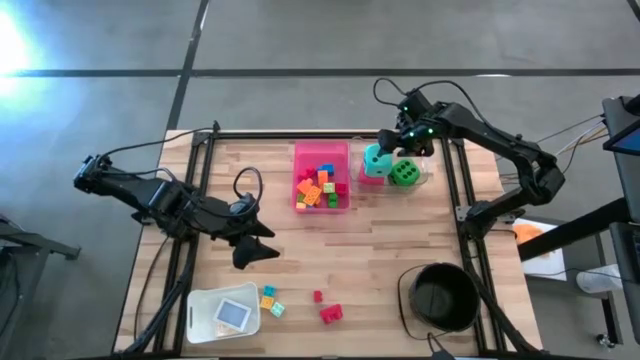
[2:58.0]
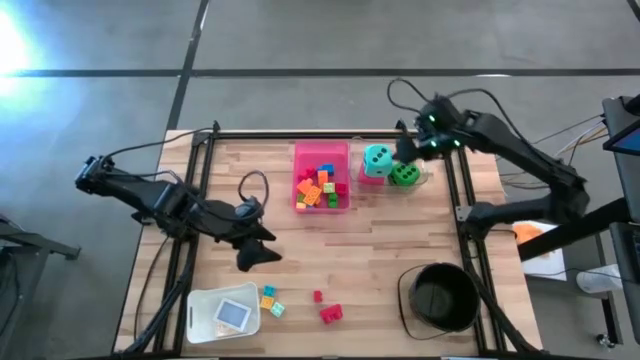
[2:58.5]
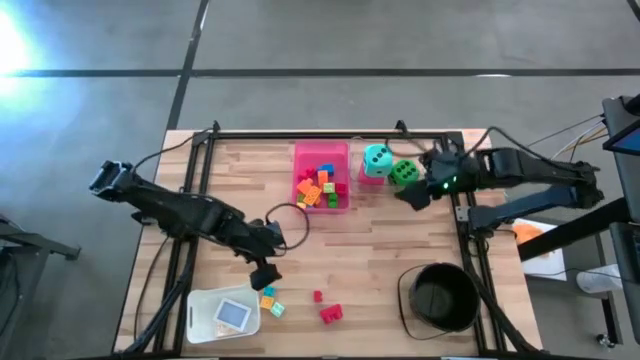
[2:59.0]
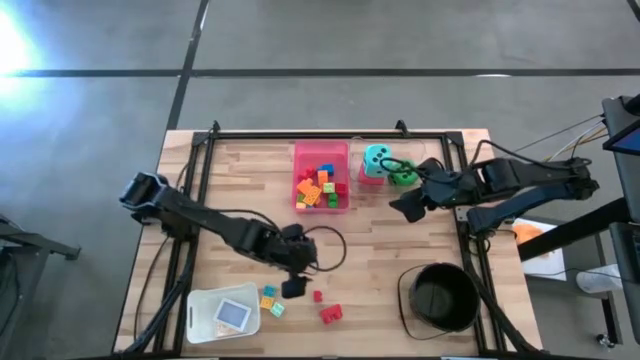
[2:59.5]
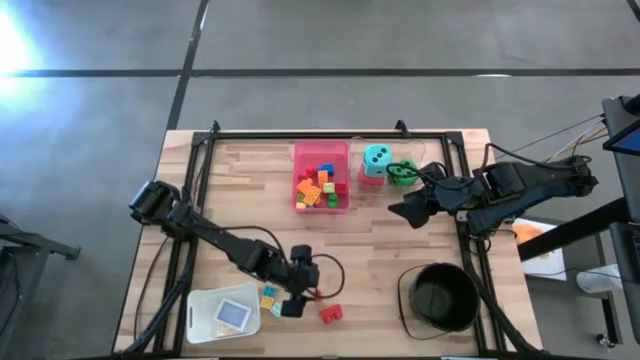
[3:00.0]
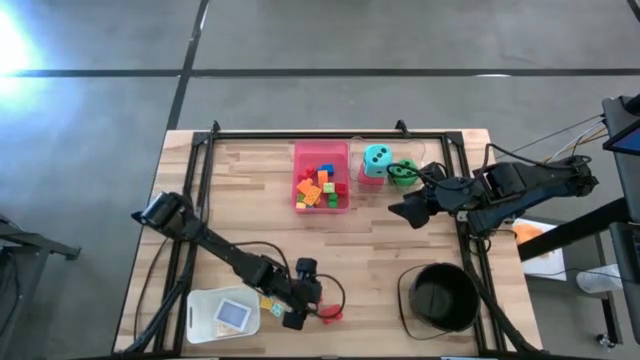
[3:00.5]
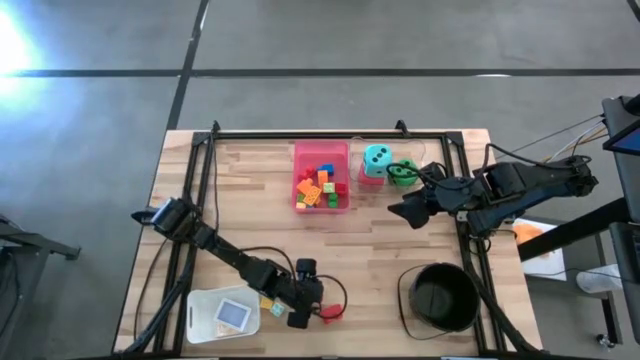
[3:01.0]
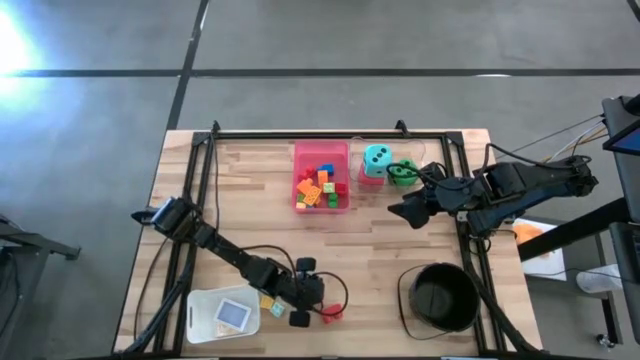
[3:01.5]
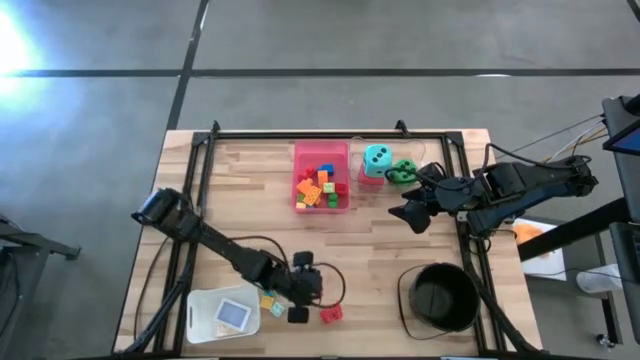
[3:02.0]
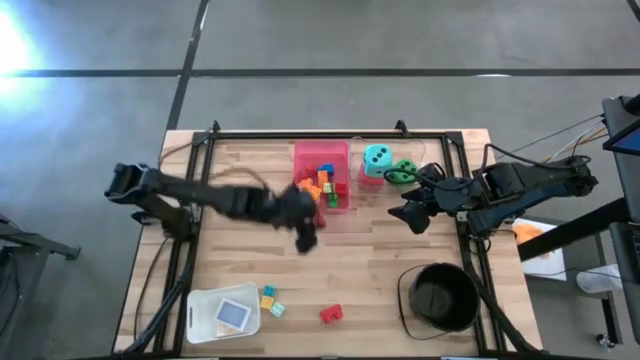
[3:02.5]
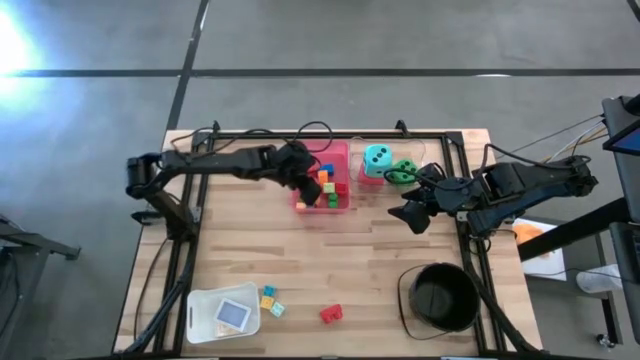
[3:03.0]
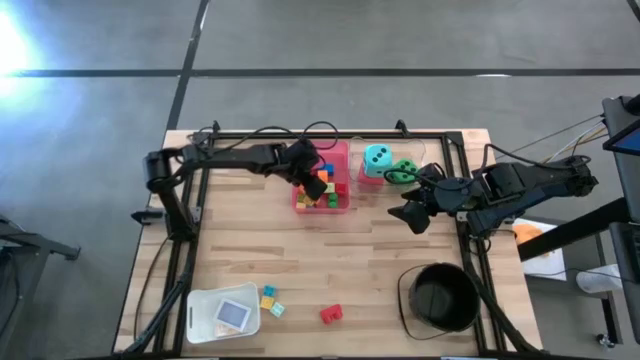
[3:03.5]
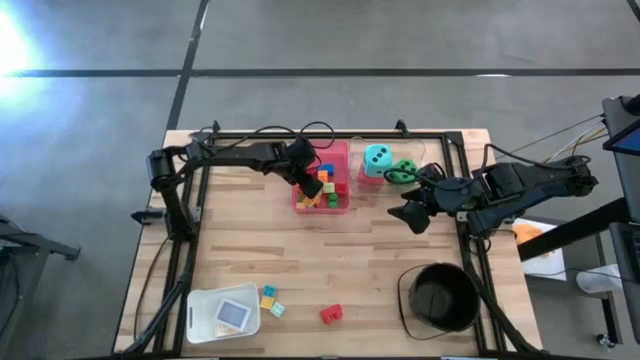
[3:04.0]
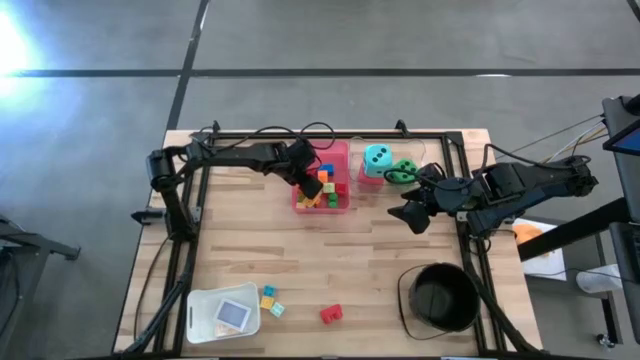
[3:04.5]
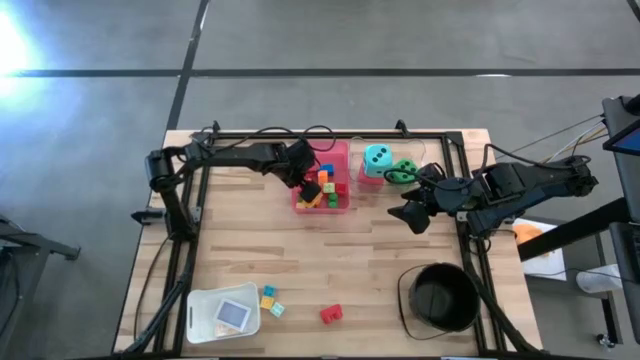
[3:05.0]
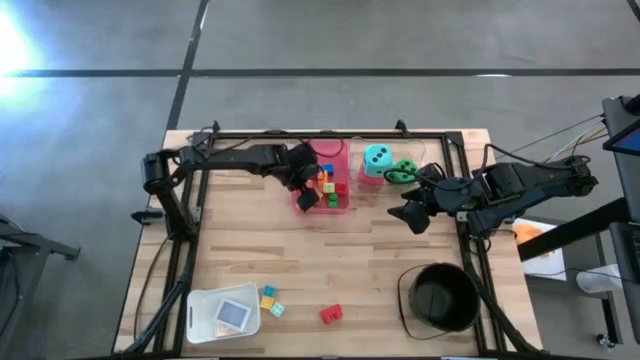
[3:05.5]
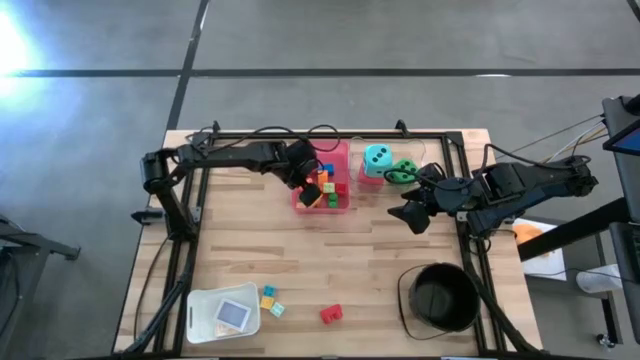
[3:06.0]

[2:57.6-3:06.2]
Task: Pick & Place Toys
Put the red game piece into the red bin

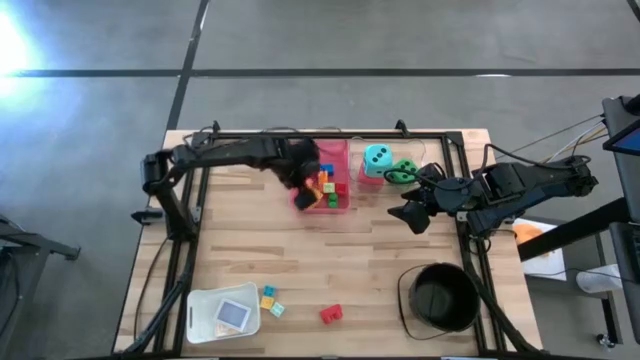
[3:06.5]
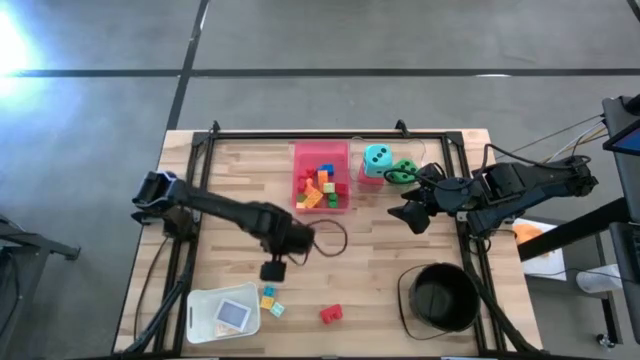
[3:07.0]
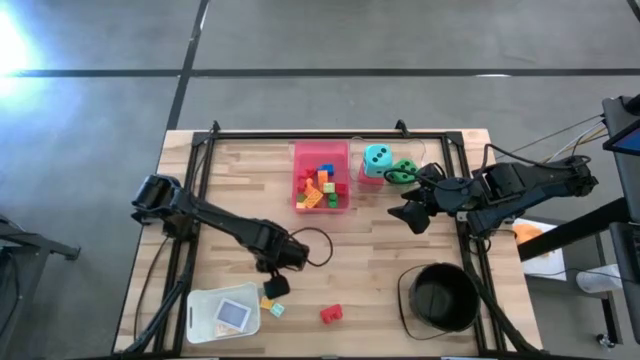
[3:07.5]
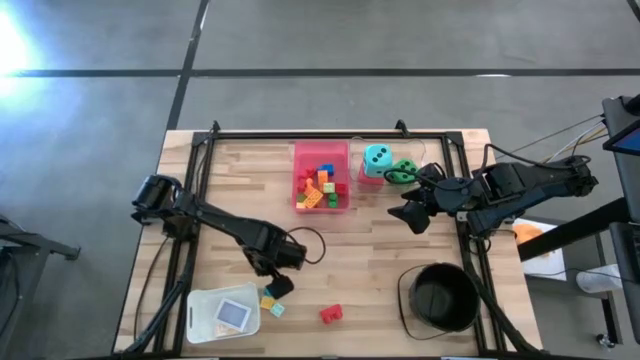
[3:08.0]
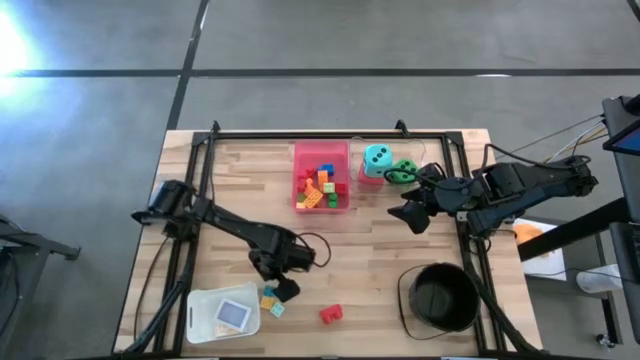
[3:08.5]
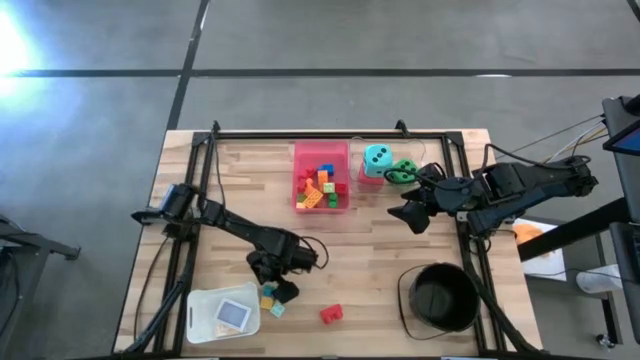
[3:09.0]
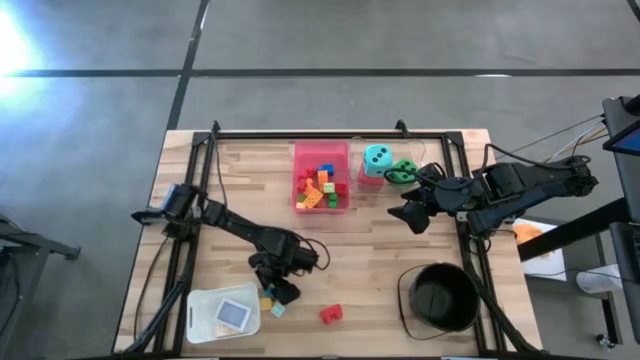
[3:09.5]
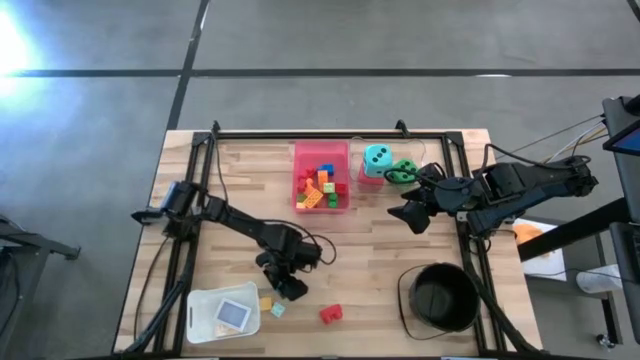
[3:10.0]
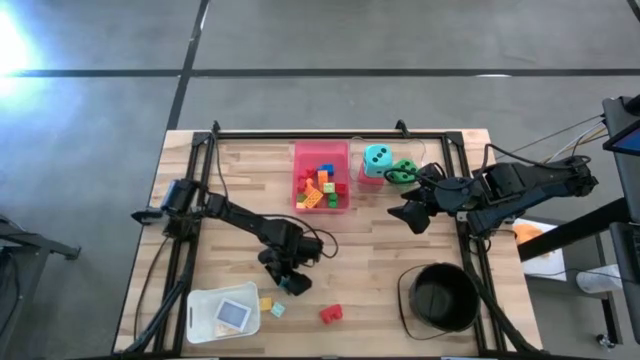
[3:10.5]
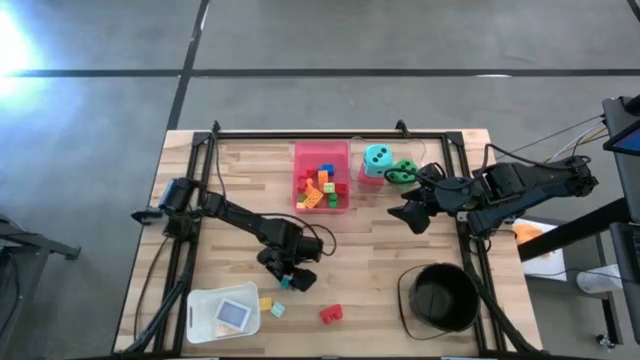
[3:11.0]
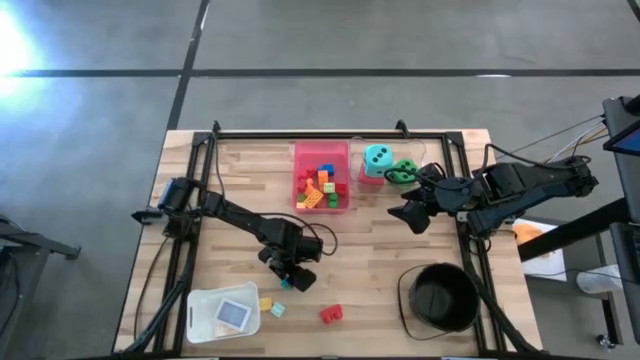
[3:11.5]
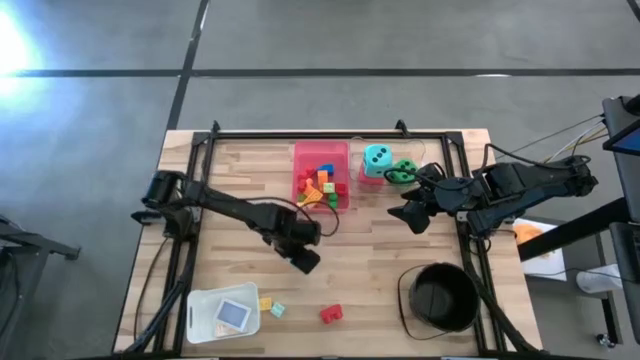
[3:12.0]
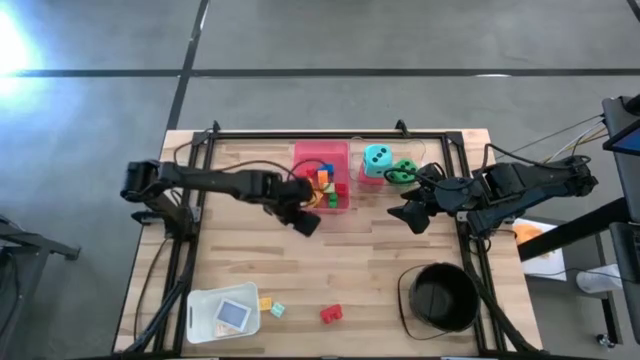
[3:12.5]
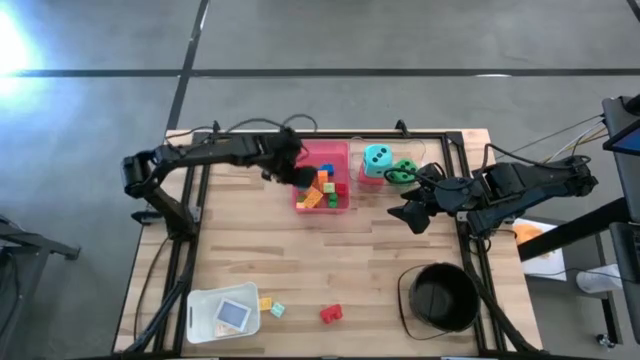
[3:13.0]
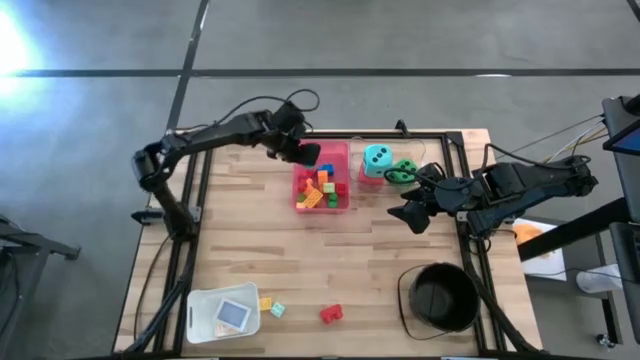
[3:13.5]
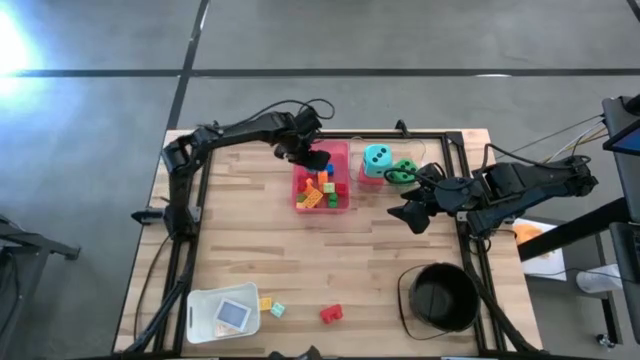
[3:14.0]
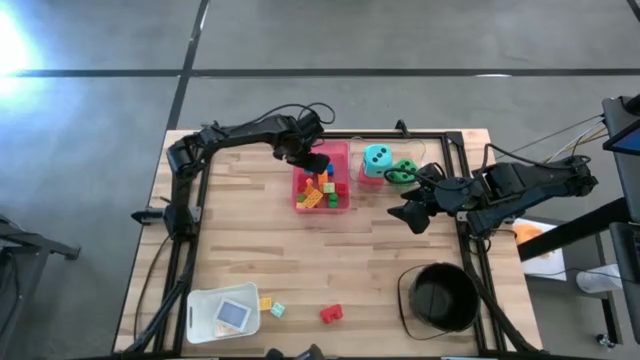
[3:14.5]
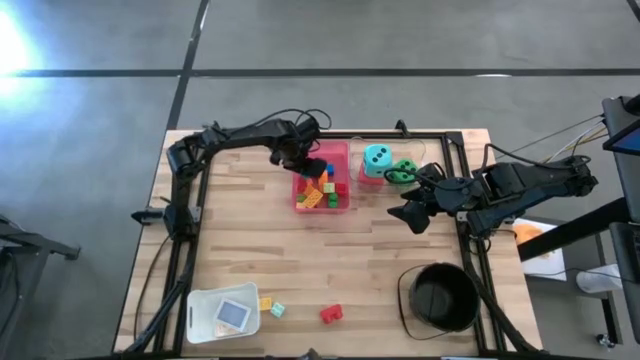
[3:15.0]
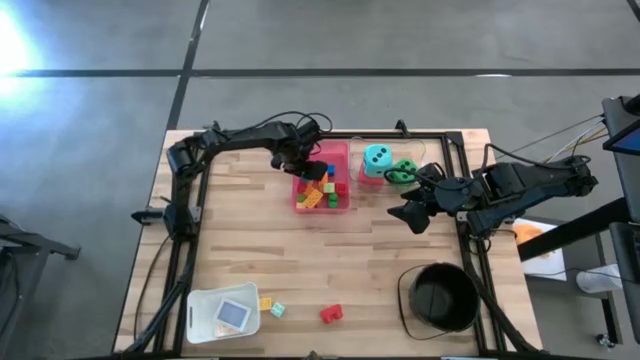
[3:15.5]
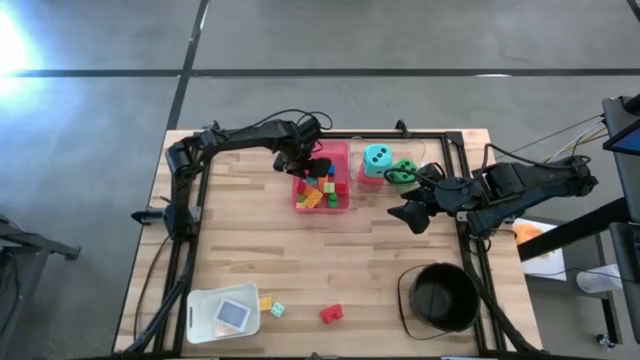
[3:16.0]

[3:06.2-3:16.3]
Put the blue game piece into the red bin

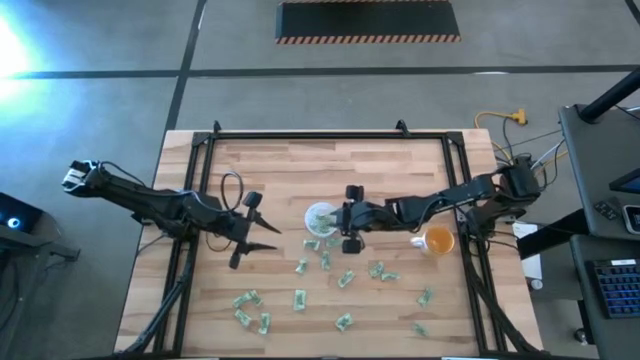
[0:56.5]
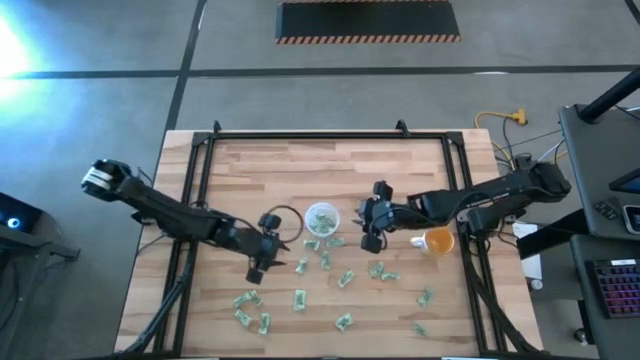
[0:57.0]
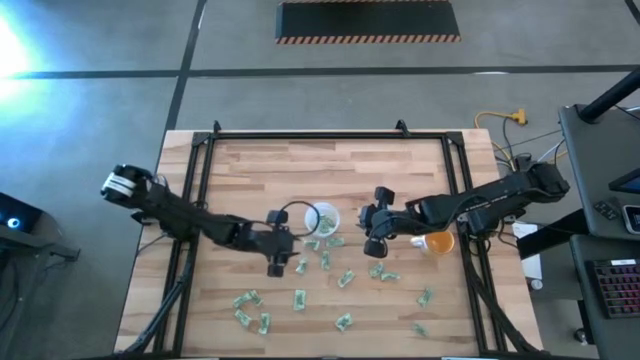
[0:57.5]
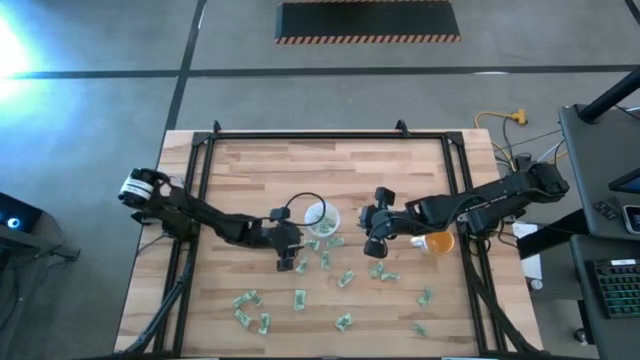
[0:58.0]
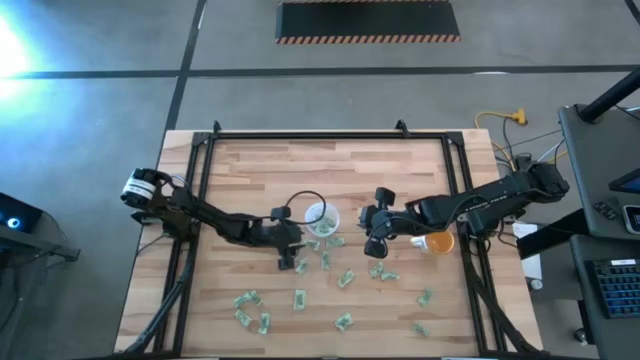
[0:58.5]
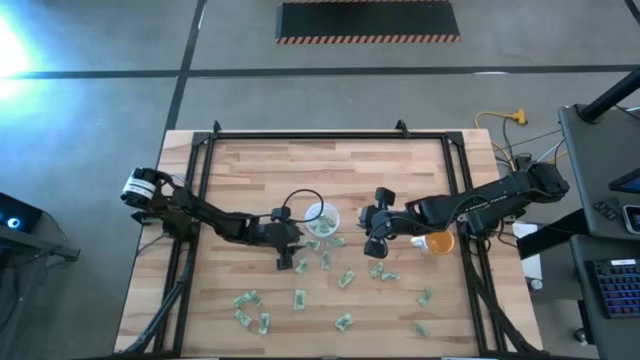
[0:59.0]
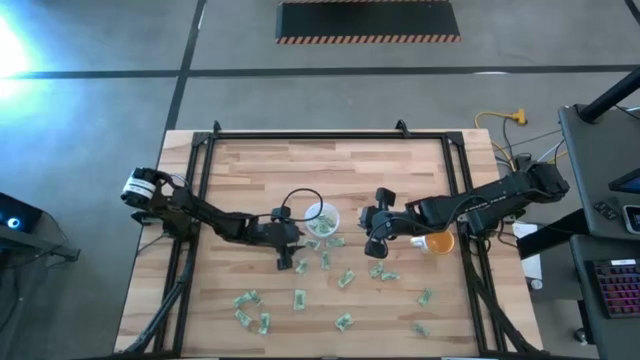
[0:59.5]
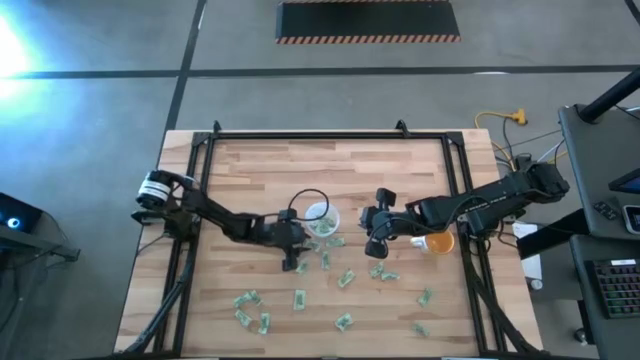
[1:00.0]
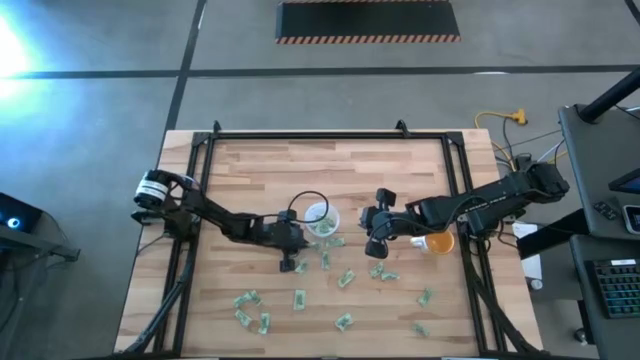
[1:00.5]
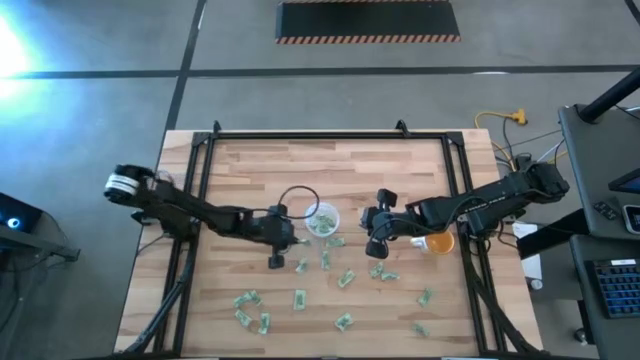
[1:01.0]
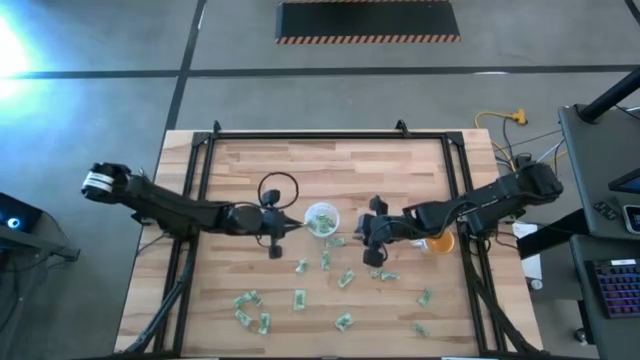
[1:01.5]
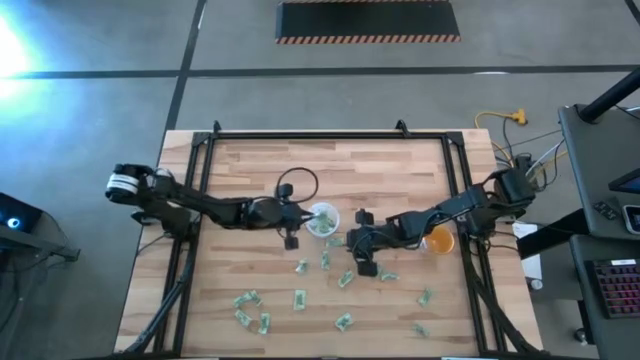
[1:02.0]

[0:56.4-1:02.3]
Task: Pick and place Stevia / Truvia into bins
Put the light green stevia packet into the transparent container
